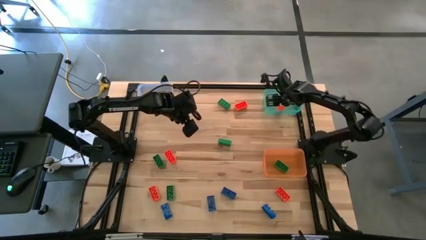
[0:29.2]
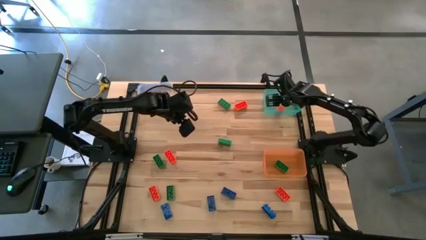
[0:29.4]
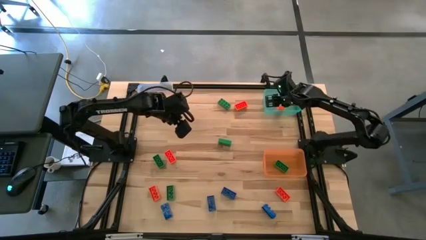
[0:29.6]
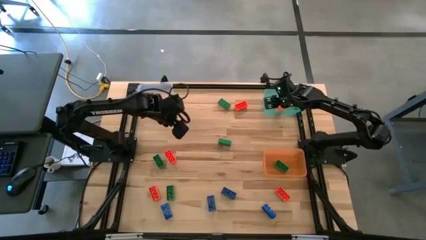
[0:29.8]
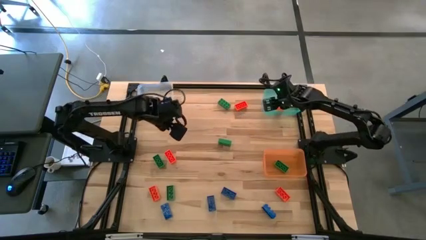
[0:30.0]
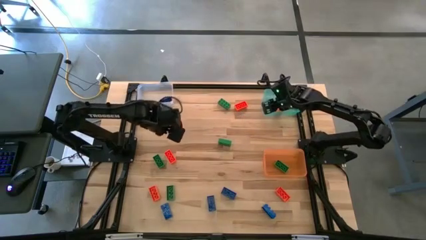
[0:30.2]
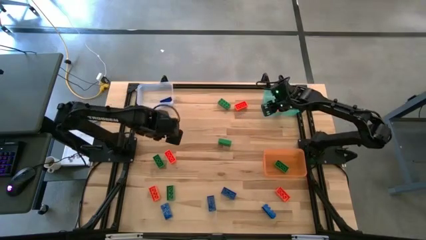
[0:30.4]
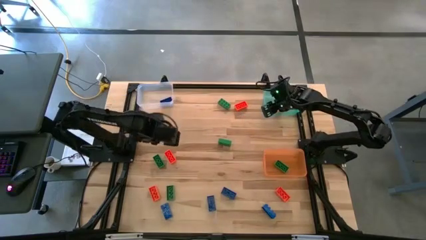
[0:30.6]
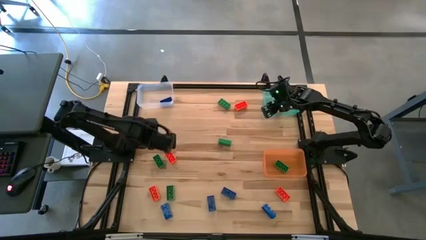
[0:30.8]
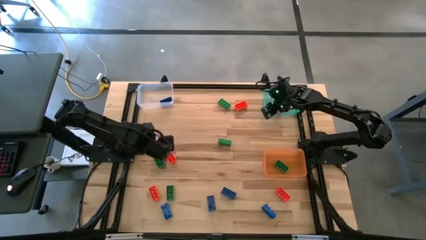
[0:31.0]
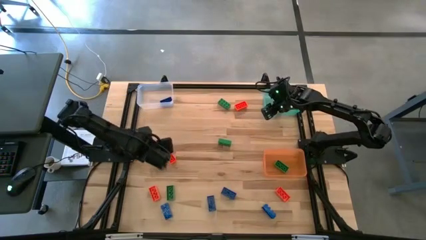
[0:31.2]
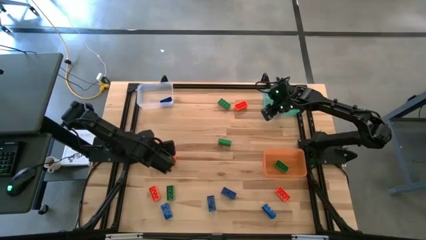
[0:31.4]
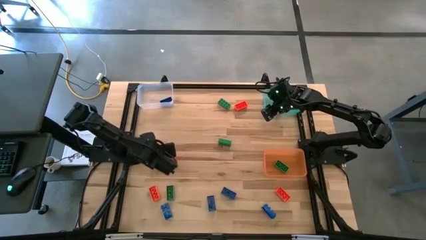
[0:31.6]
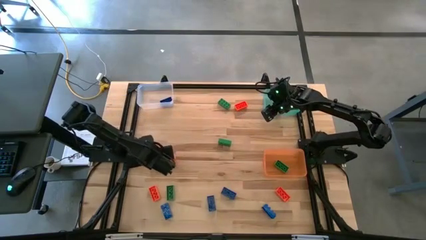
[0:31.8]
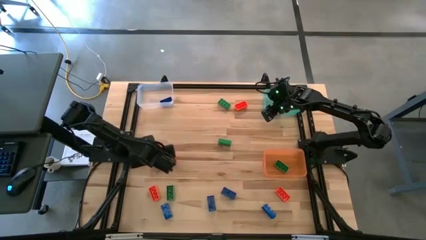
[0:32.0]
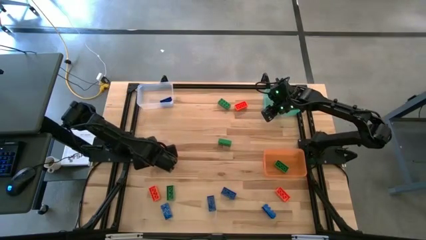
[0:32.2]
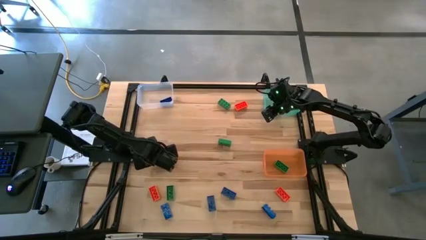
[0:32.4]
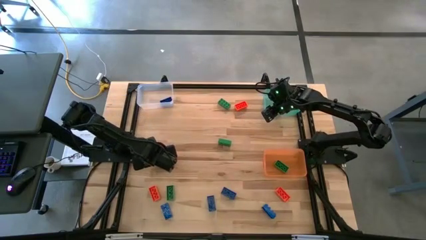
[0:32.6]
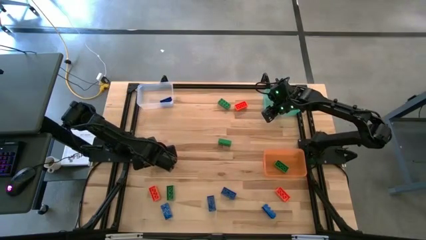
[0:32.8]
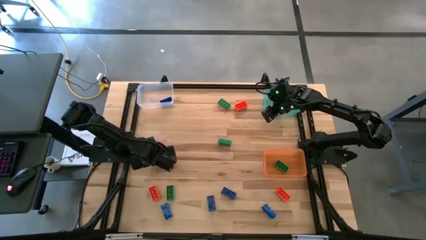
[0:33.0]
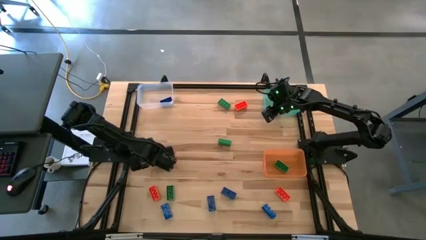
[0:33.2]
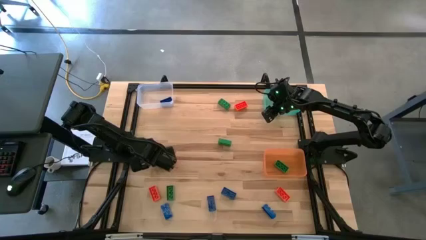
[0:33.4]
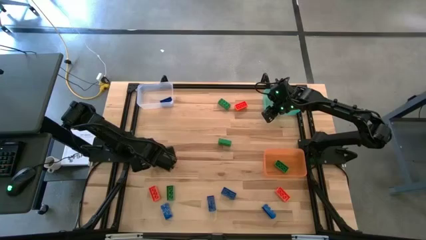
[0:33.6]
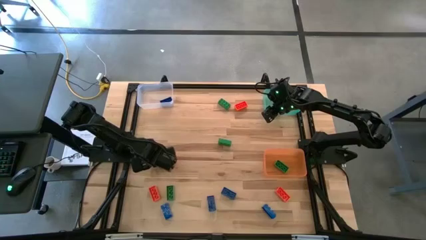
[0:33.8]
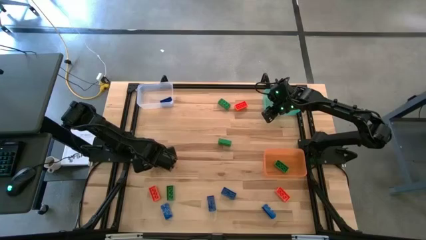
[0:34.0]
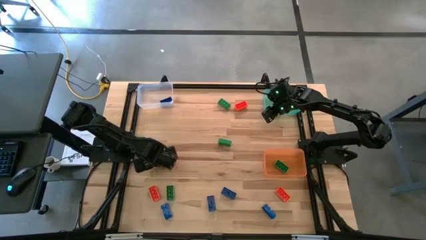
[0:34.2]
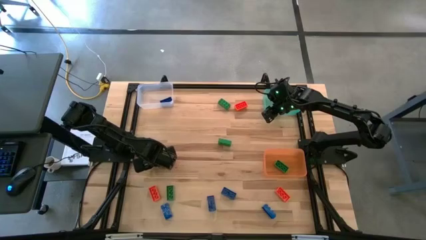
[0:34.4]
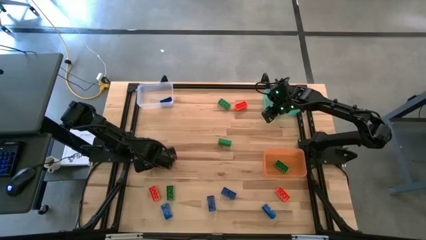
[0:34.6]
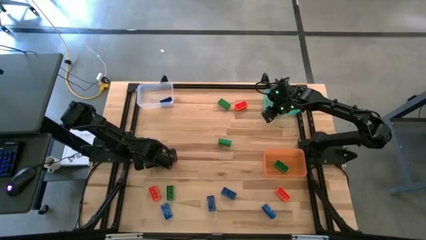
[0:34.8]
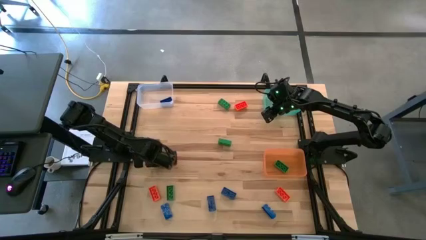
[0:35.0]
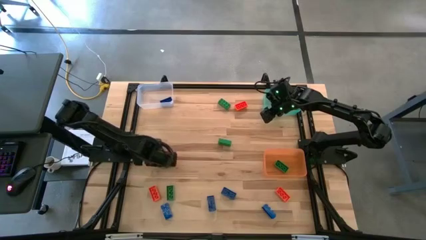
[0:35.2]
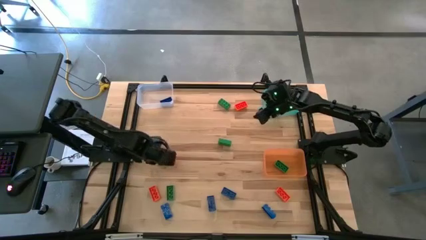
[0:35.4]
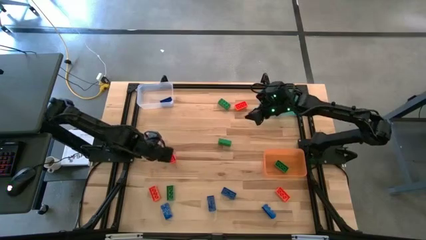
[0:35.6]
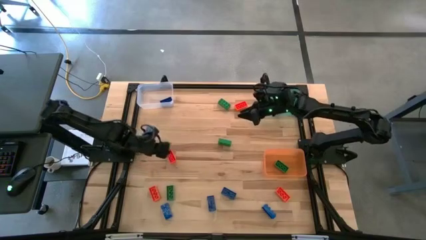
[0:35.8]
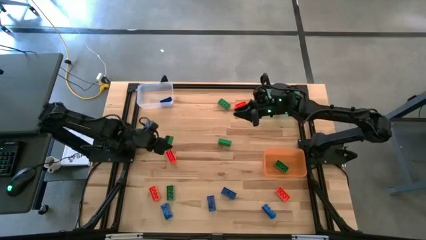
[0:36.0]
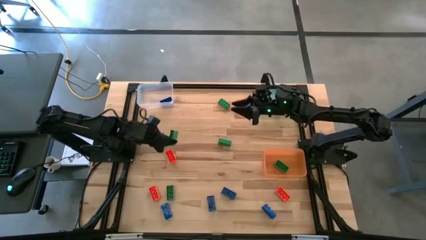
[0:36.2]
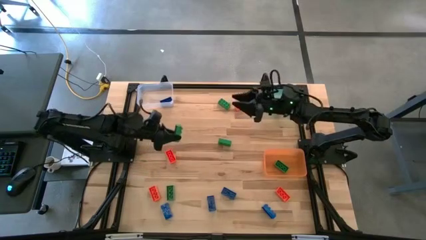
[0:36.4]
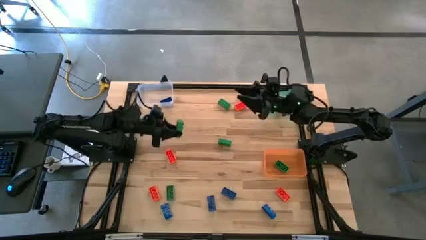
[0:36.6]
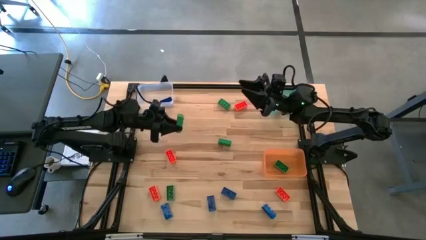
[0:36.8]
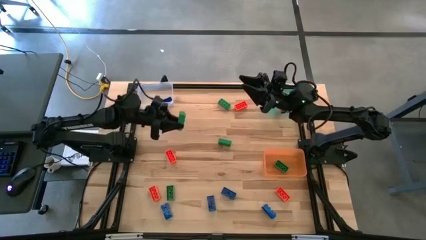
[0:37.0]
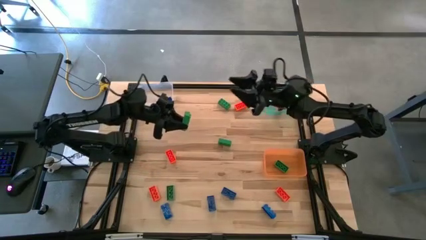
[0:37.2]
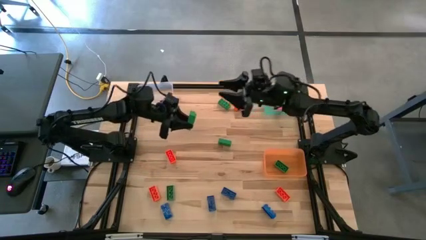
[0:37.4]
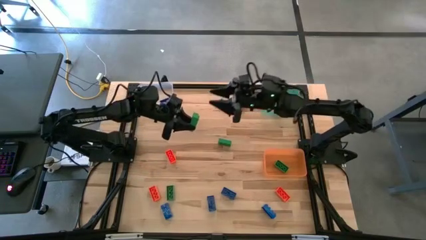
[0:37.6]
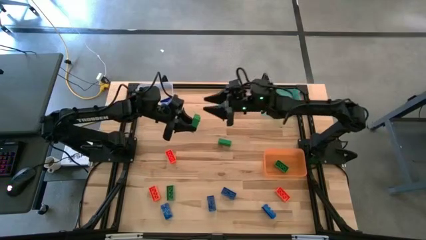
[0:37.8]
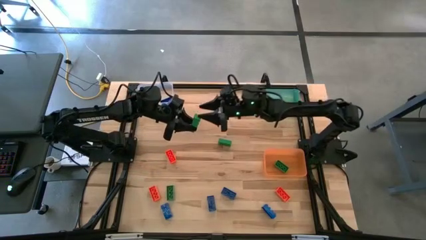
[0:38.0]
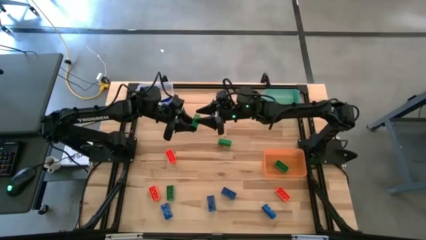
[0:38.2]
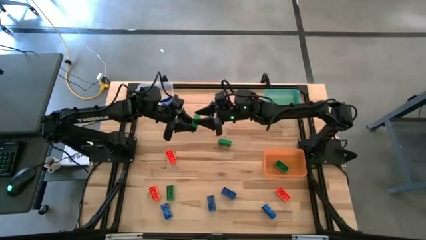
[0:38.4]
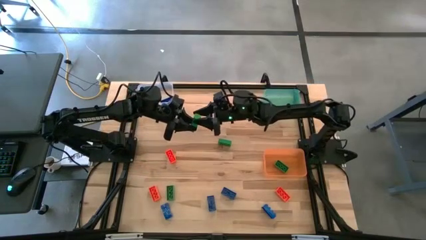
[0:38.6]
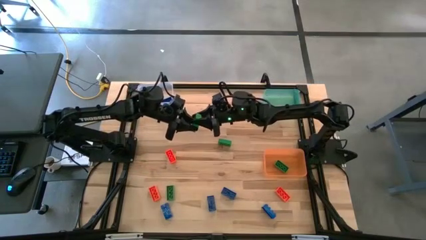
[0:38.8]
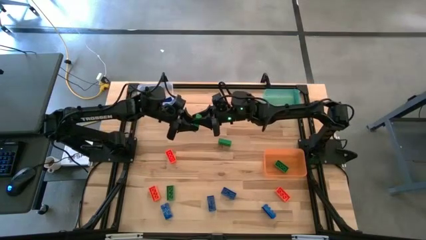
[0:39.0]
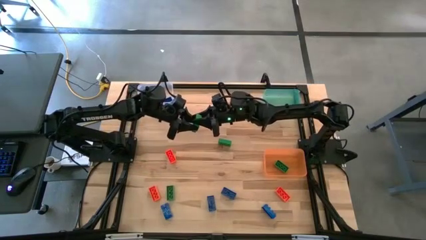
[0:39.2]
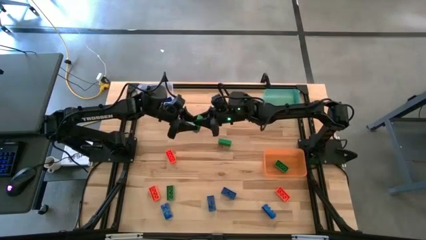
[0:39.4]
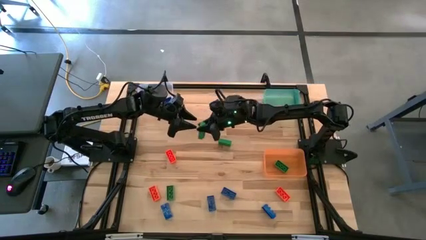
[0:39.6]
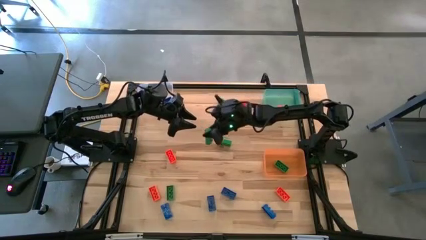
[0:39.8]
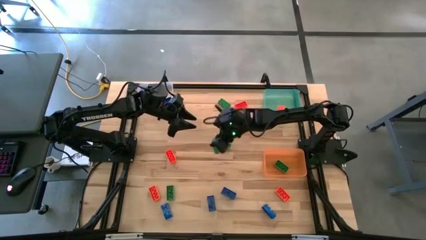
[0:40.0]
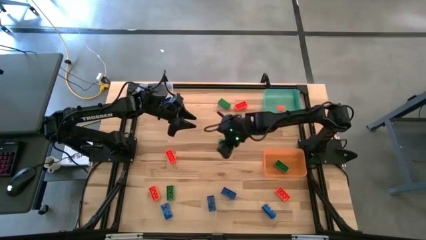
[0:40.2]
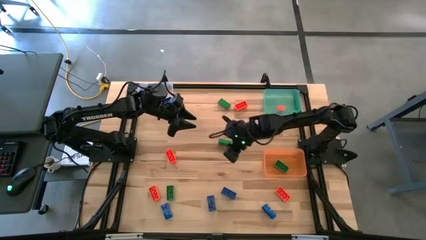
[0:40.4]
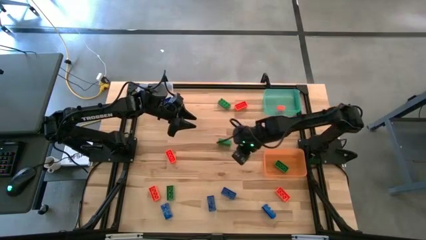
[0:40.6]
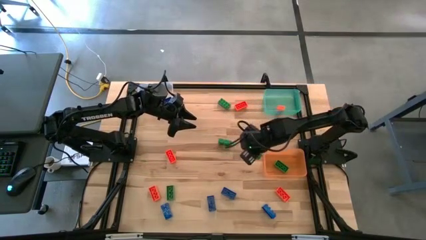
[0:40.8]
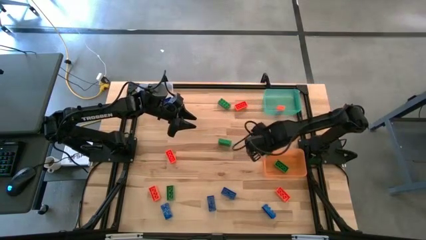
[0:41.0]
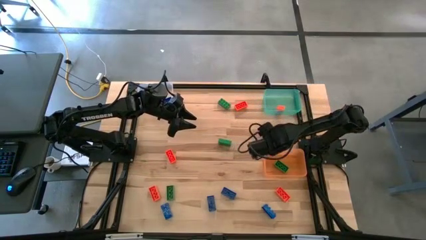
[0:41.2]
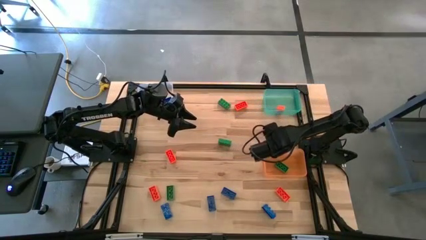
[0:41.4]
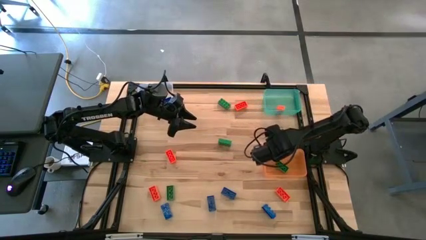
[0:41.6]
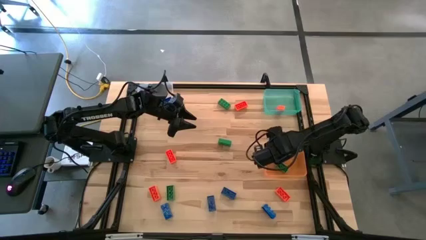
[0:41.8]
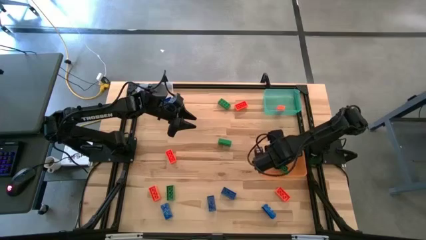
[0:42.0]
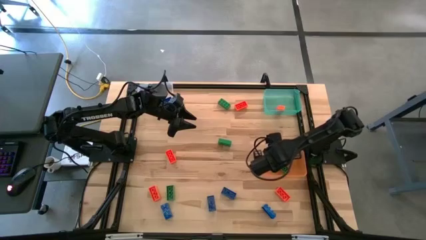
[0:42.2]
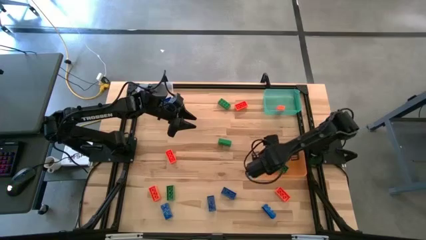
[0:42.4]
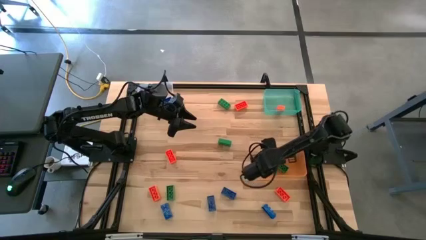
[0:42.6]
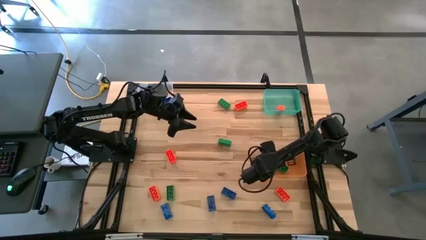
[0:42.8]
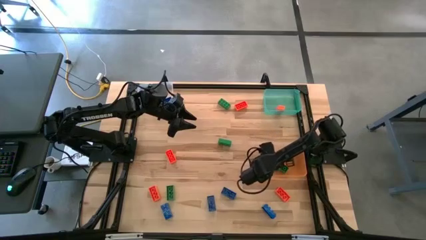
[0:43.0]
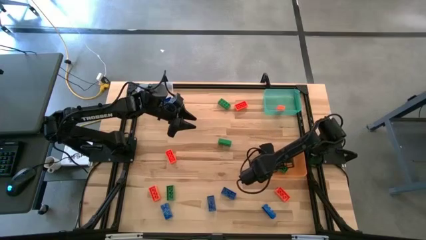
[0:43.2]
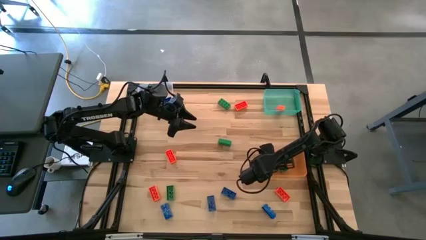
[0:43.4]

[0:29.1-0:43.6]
Task: Sort & place blocks by color
Put the green game piece into the orange bin
